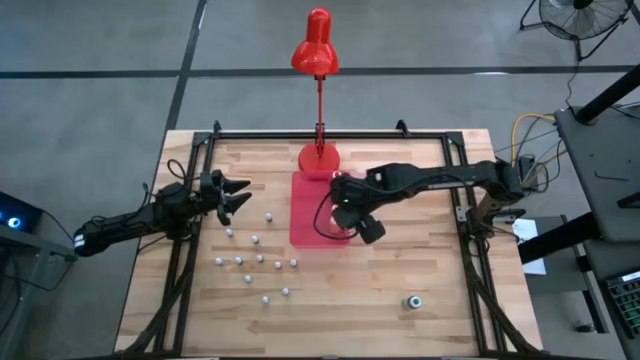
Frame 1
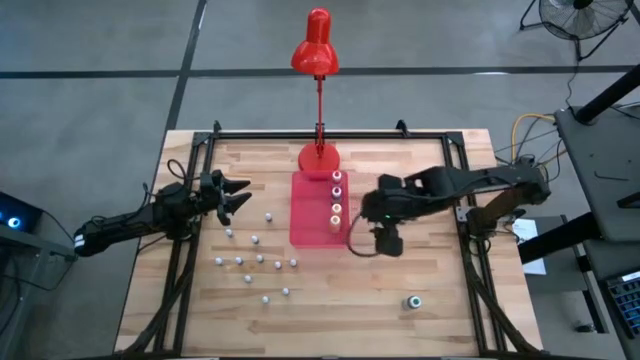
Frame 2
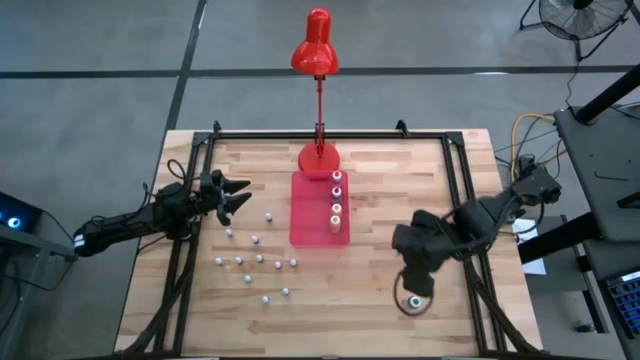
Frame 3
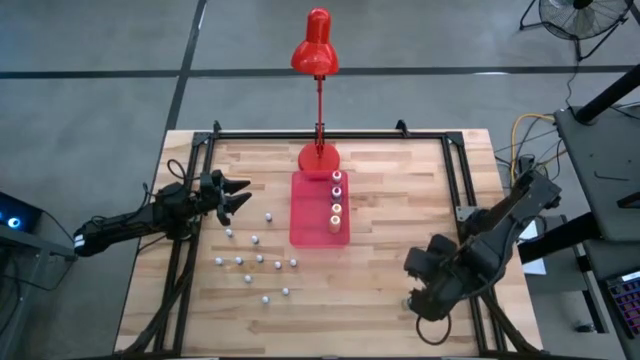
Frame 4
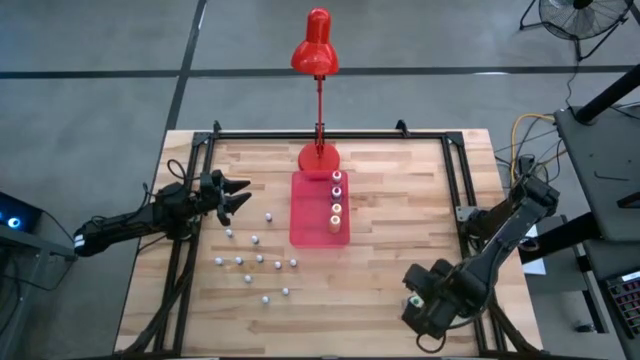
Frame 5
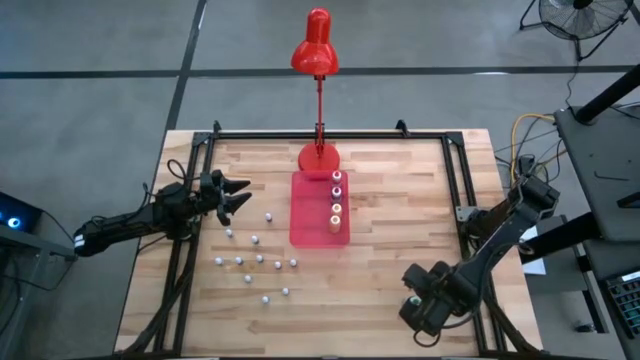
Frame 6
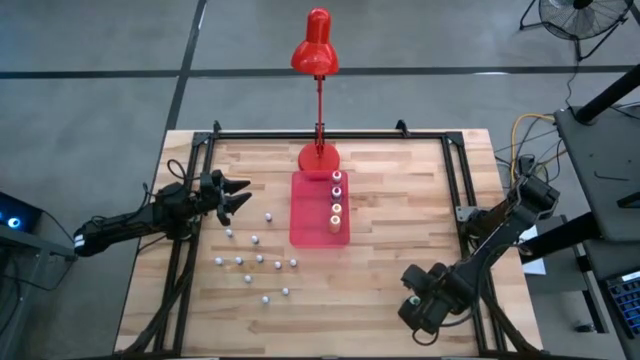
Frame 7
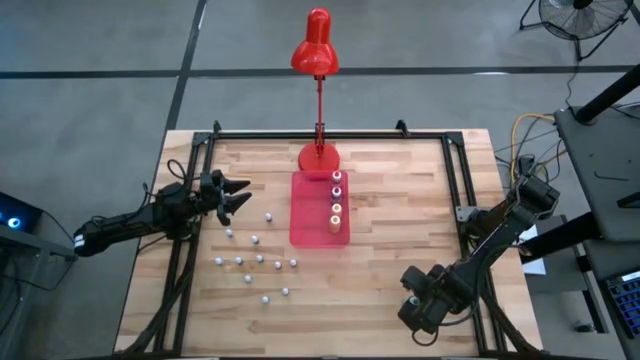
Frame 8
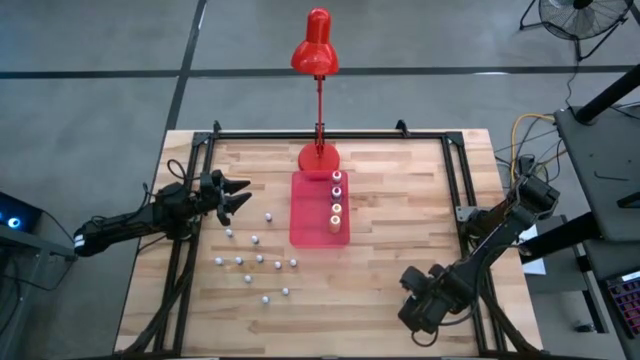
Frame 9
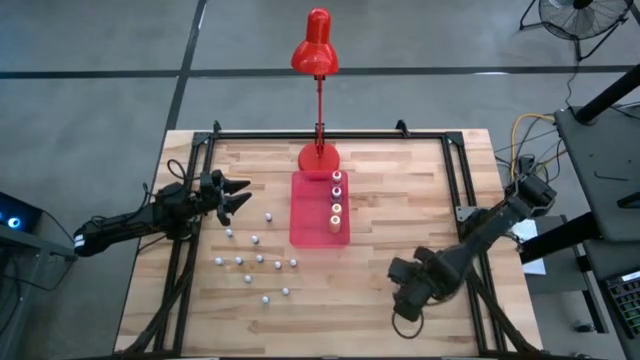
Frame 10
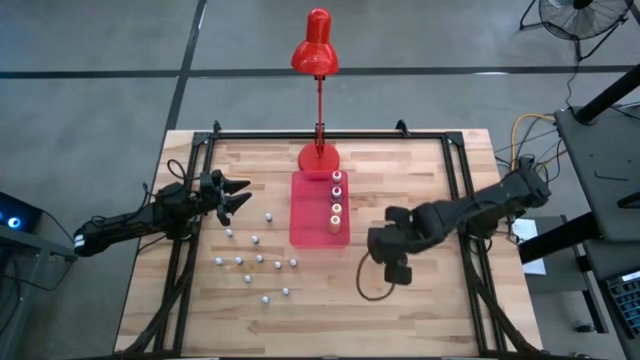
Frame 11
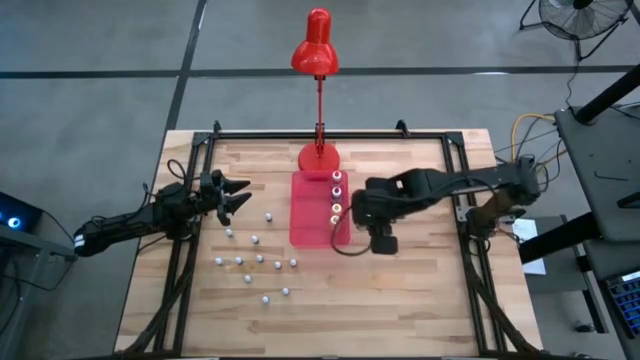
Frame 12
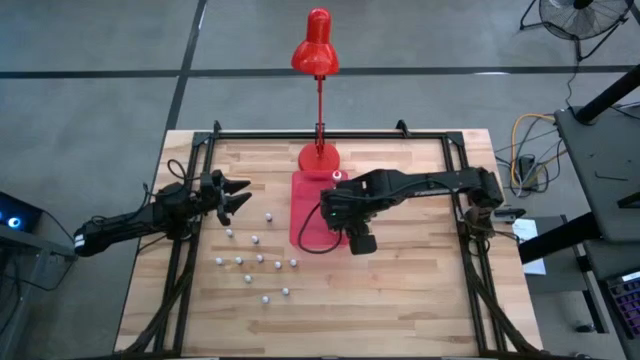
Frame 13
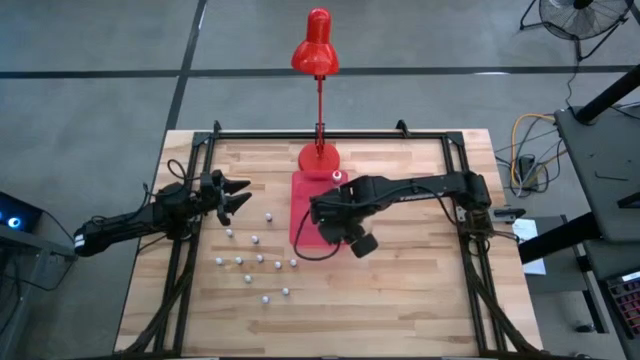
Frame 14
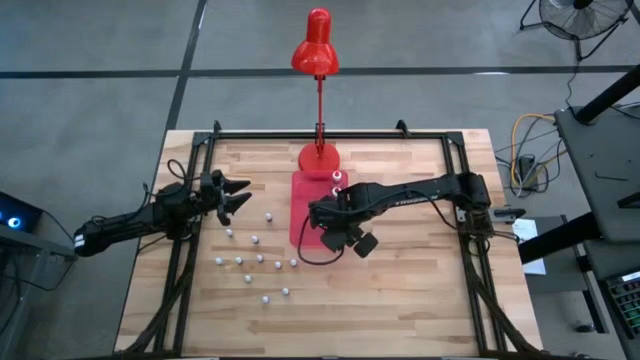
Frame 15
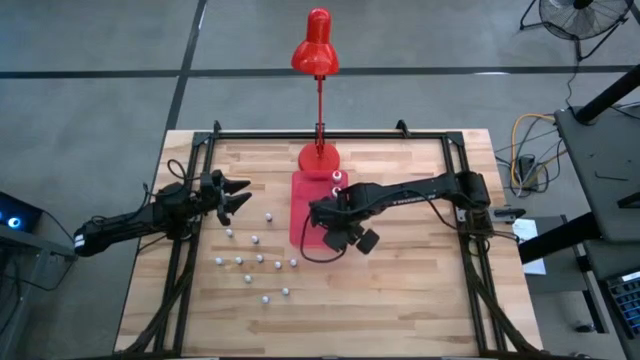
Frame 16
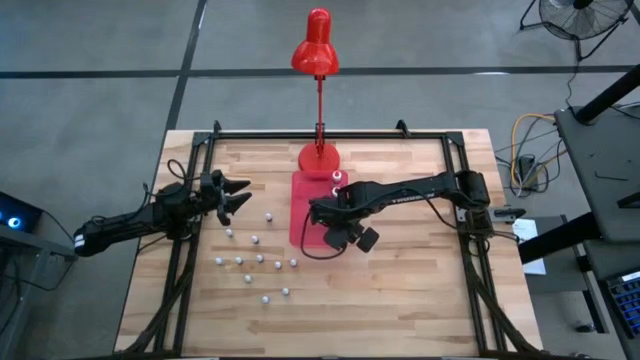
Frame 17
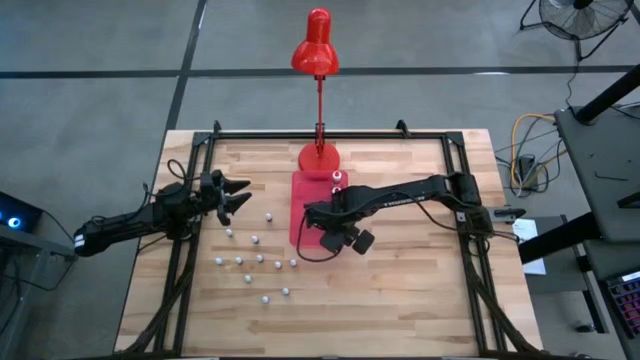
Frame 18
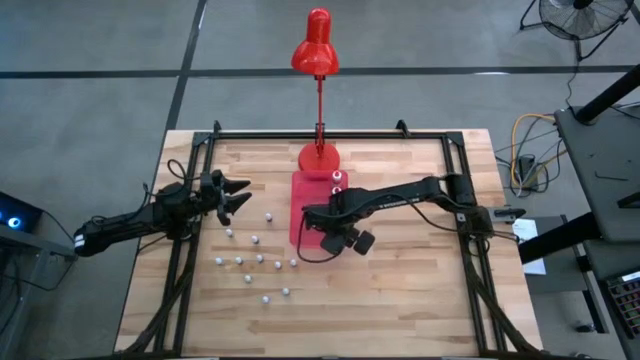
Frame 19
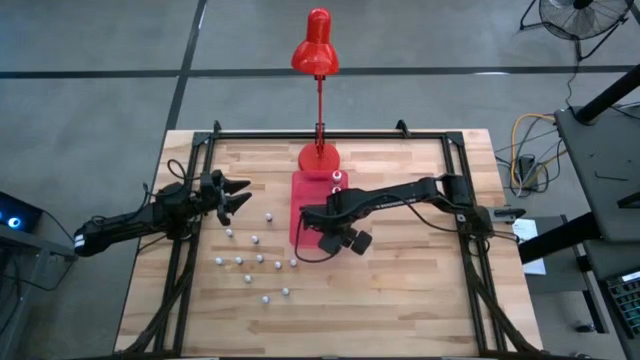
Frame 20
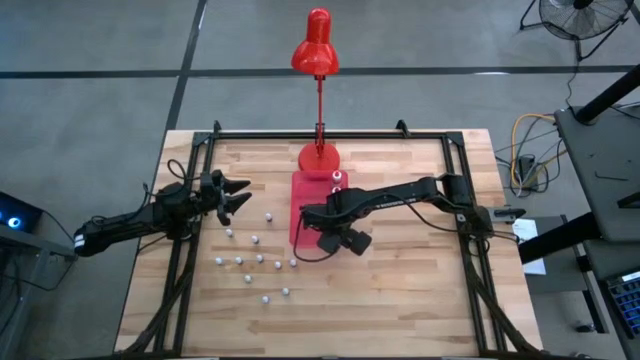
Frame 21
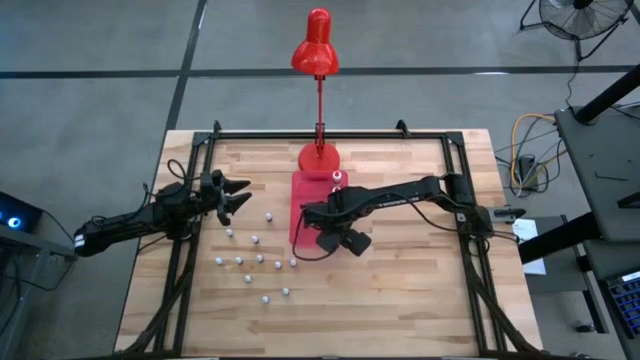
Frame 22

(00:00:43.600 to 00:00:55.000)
Task: Pick & Place food coloring
Put the big green food coloring bottle into the pink bin

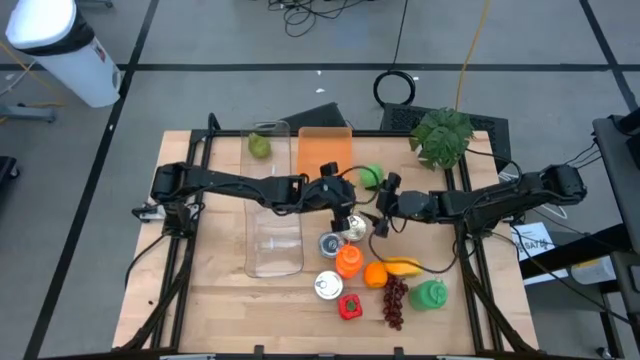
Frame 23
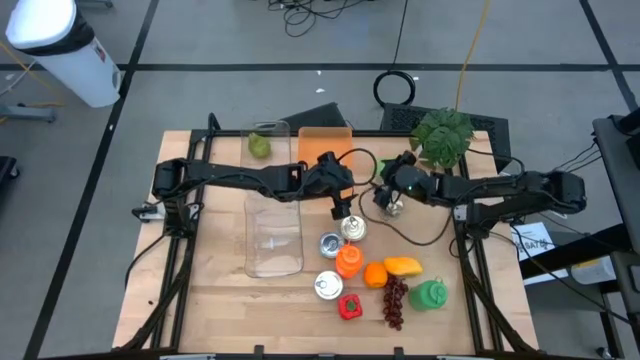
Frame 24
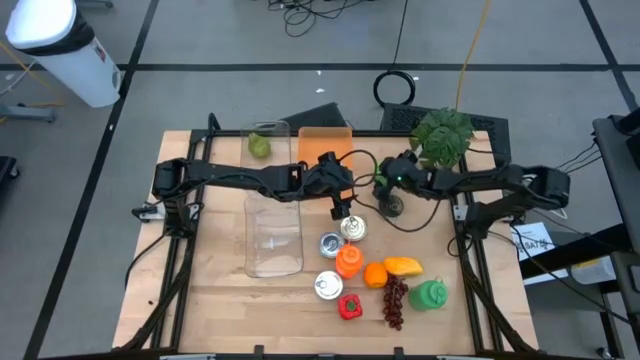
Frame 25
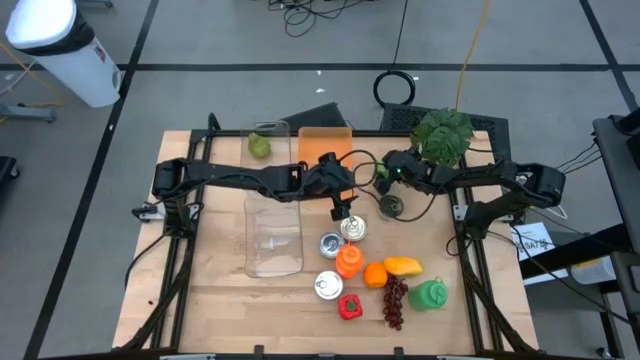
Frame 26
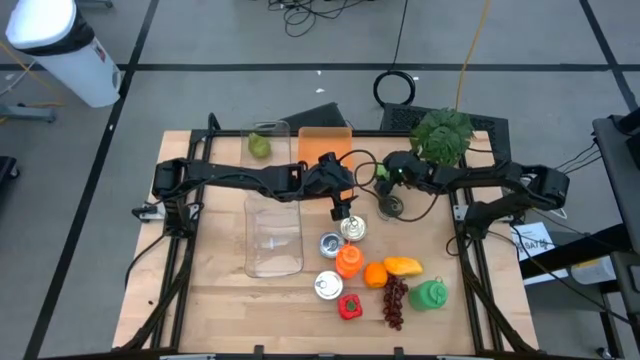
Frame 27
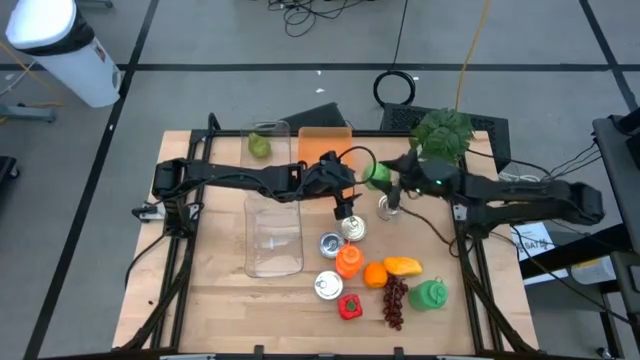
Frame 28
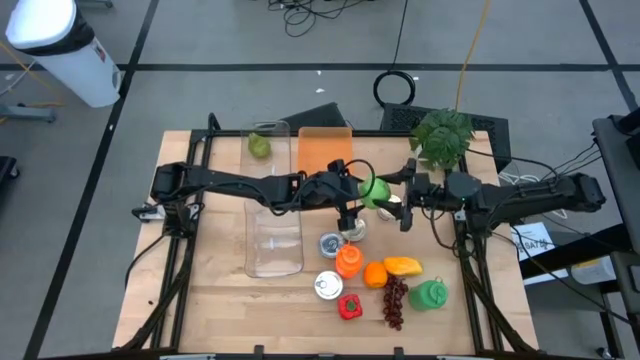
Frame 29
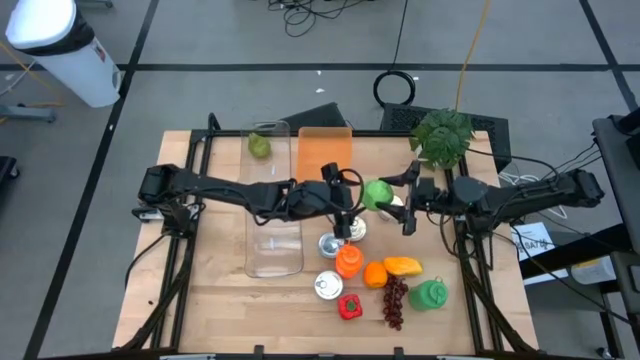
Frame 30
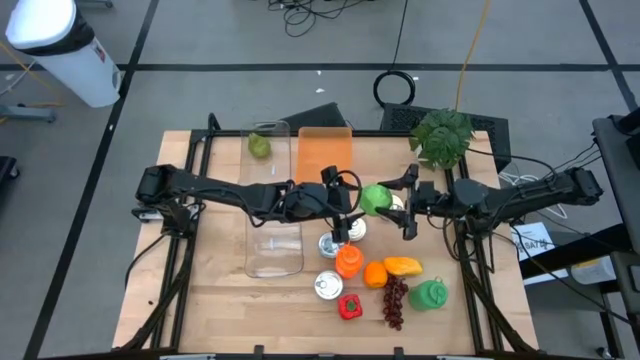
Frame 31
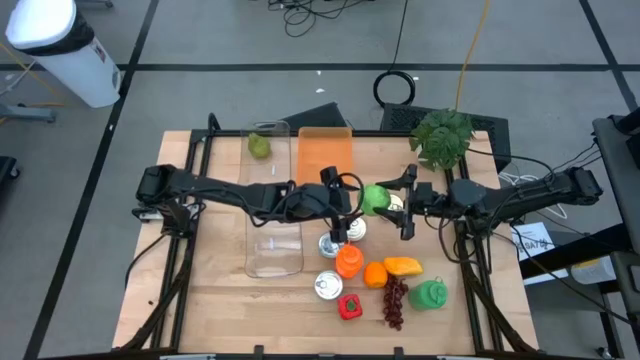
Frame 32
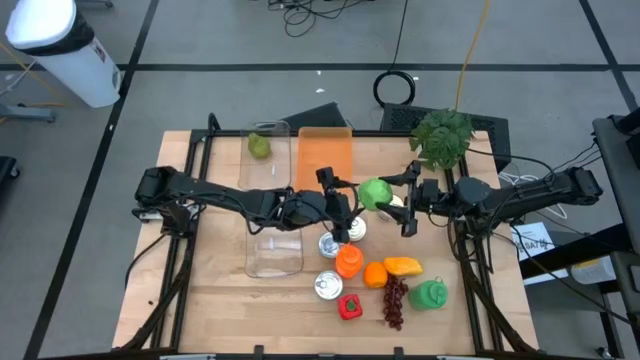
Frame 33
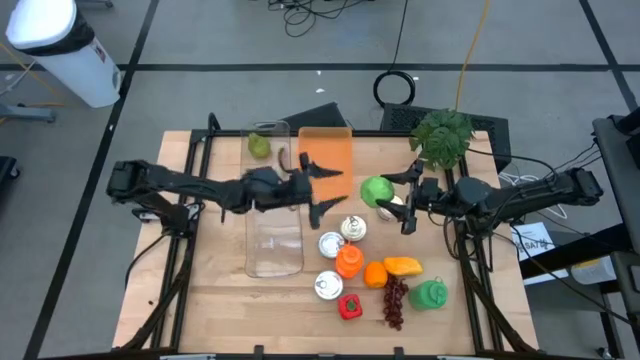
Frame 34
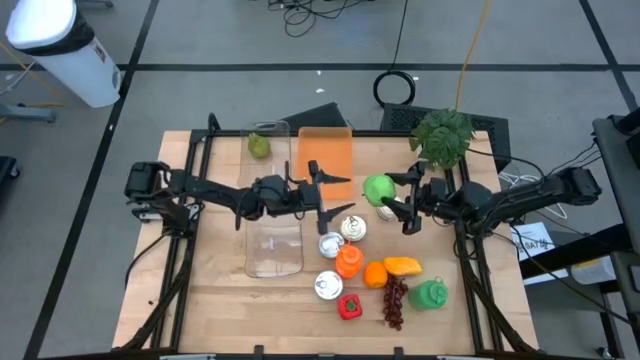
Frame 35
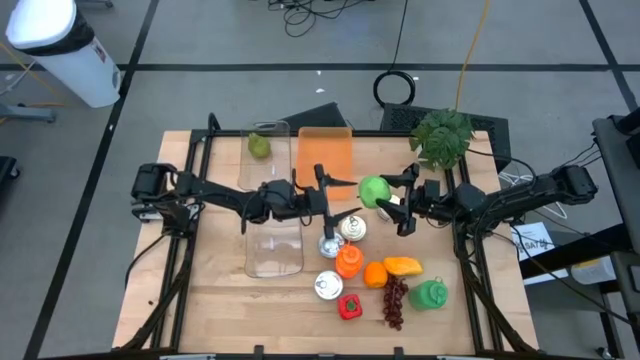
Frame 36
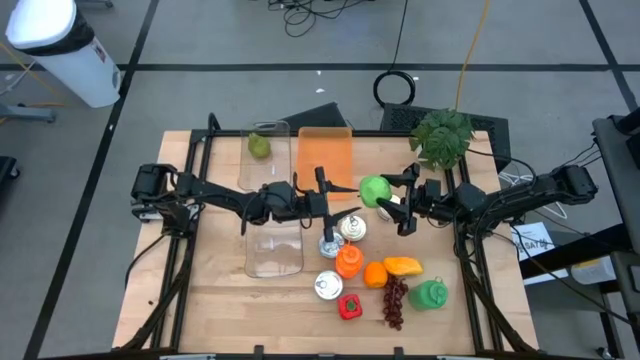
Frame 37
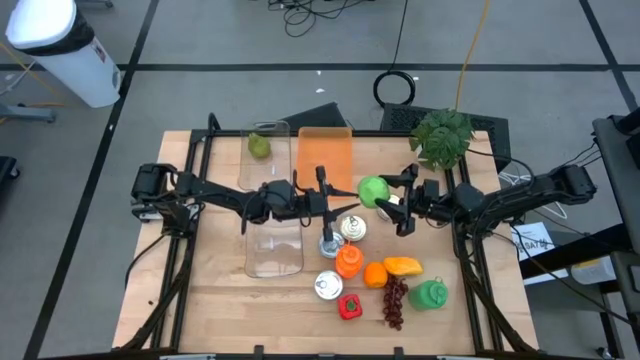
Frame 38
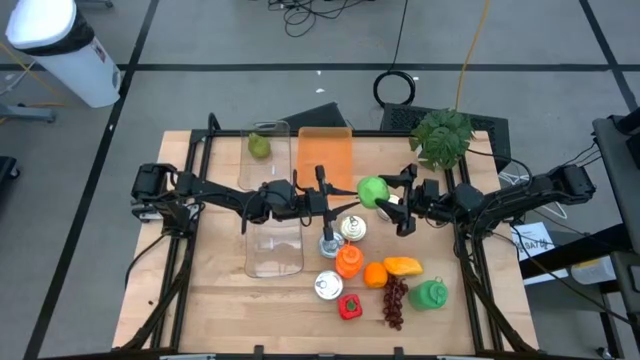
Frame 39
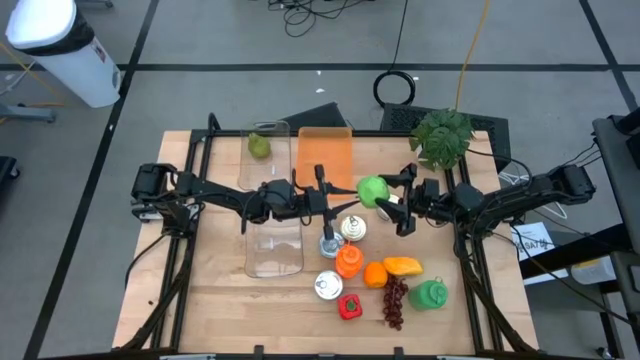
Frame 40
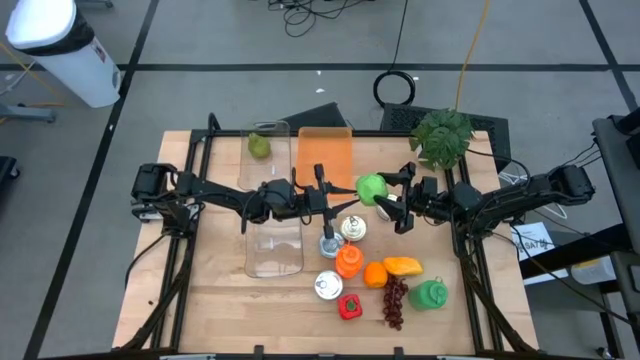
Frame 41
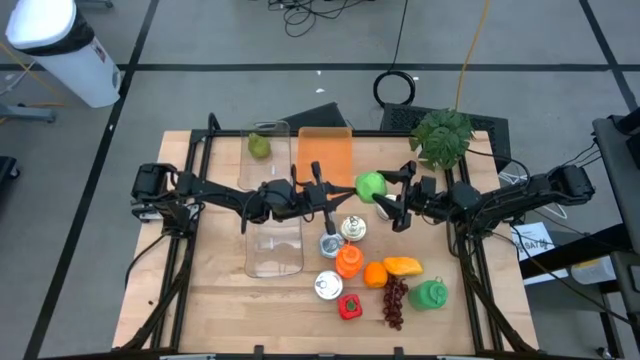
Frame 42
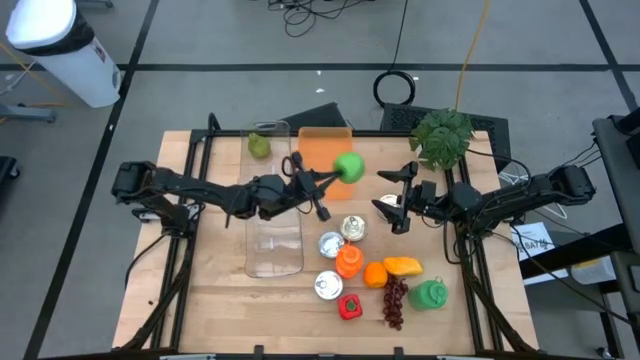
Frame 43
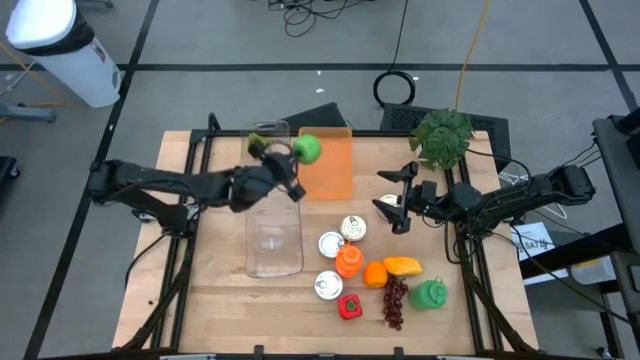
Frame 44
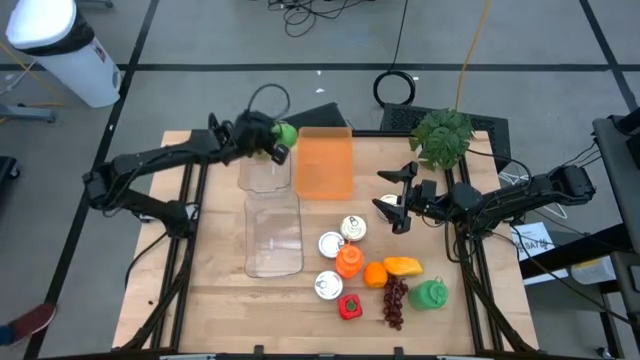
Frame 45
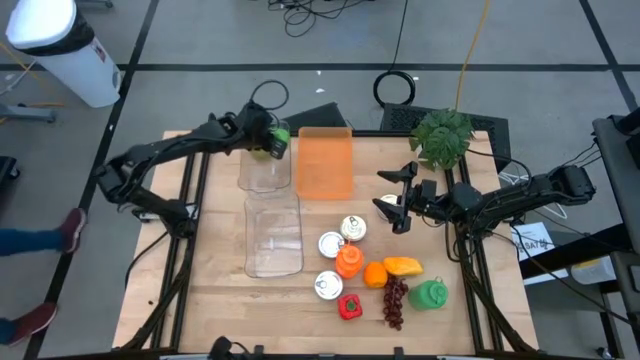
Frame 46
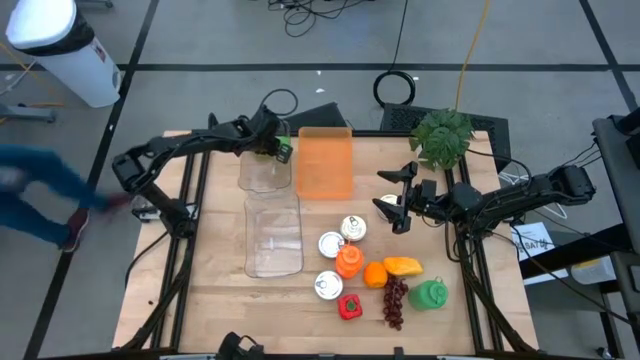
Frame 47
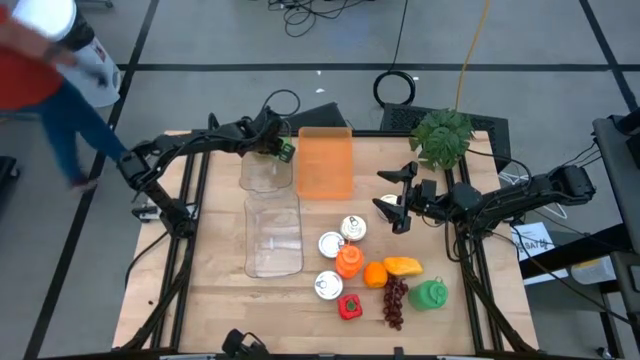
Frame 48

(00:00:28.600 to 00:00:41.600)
Task: Pick & Place Food Item
Put the green apple into the top transparent bin
